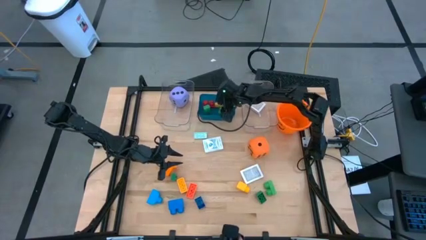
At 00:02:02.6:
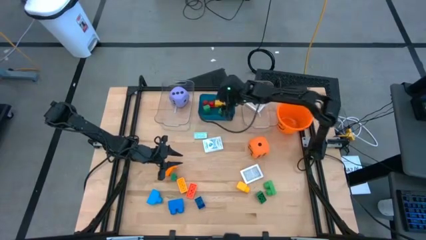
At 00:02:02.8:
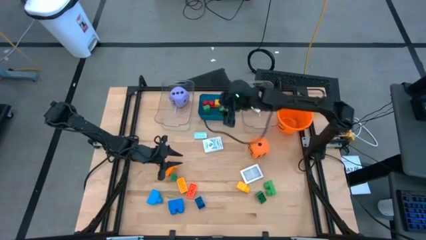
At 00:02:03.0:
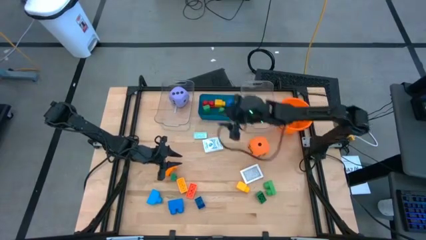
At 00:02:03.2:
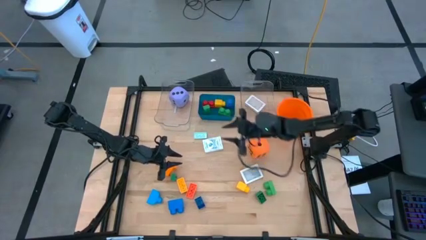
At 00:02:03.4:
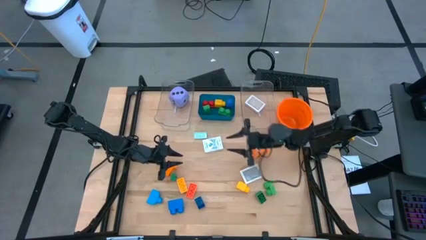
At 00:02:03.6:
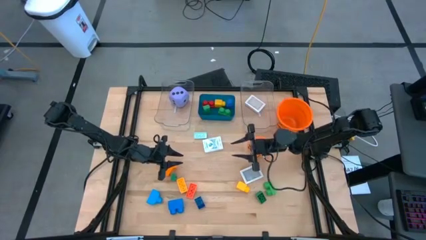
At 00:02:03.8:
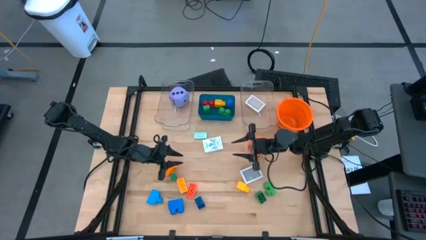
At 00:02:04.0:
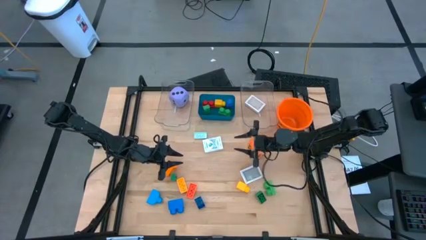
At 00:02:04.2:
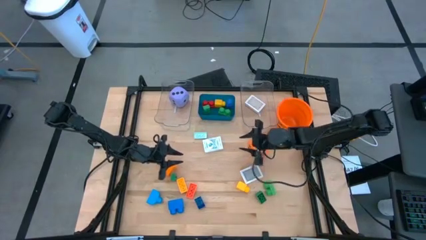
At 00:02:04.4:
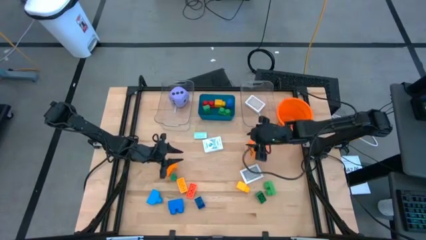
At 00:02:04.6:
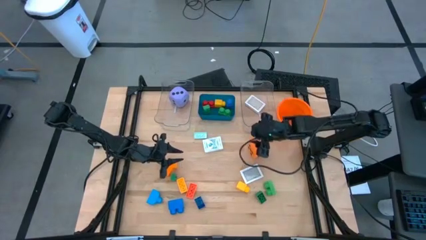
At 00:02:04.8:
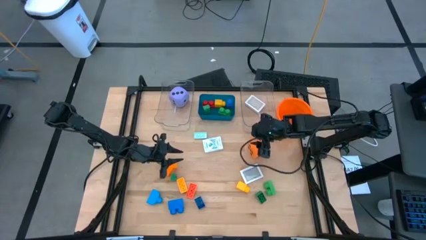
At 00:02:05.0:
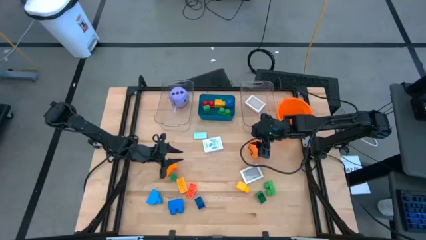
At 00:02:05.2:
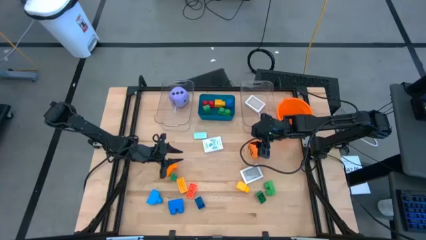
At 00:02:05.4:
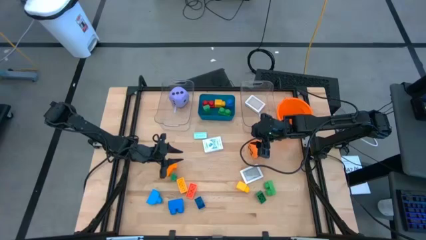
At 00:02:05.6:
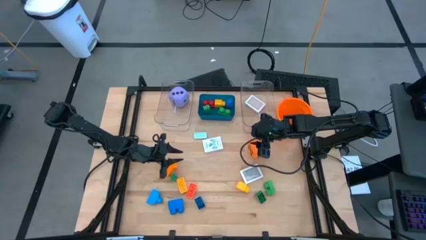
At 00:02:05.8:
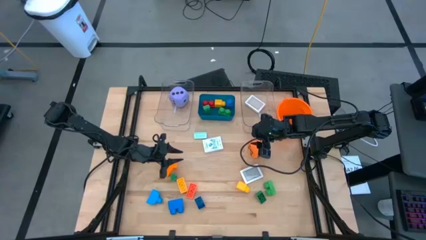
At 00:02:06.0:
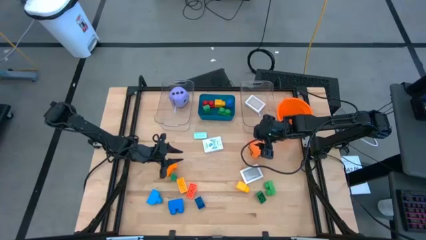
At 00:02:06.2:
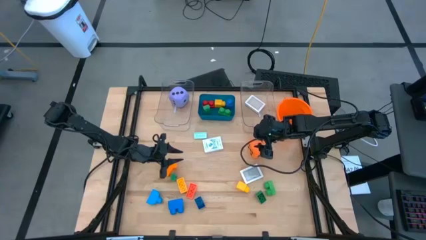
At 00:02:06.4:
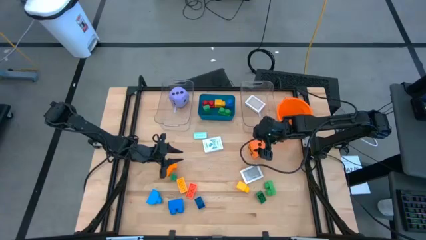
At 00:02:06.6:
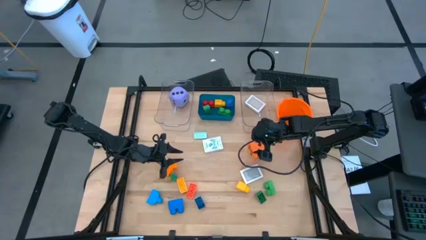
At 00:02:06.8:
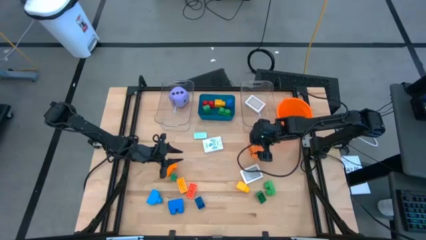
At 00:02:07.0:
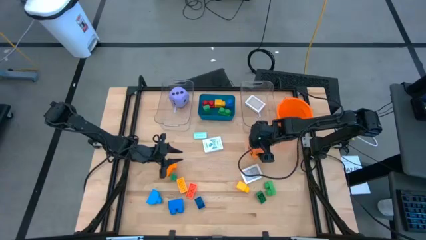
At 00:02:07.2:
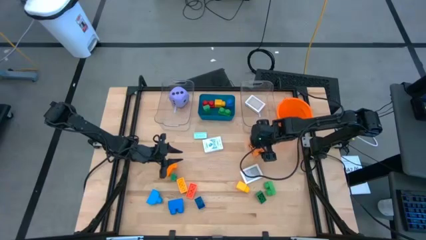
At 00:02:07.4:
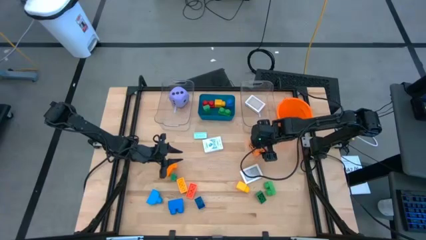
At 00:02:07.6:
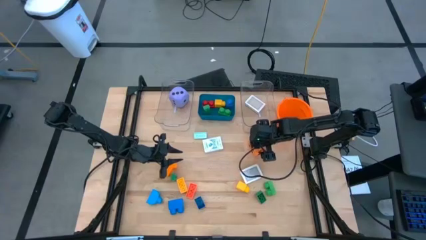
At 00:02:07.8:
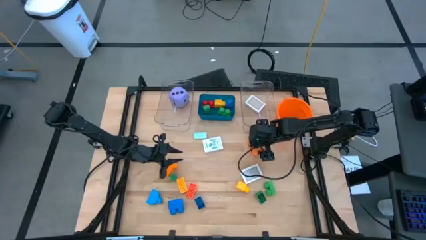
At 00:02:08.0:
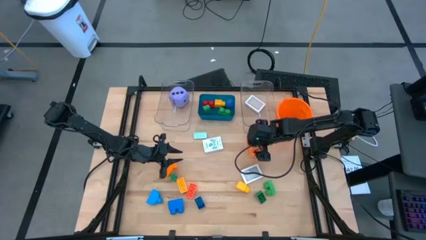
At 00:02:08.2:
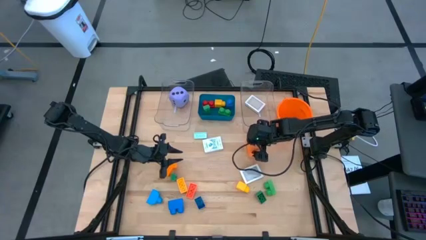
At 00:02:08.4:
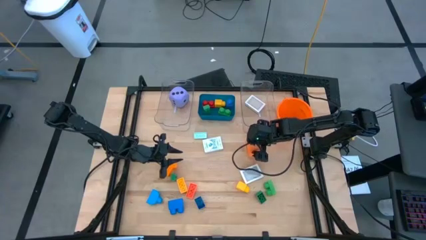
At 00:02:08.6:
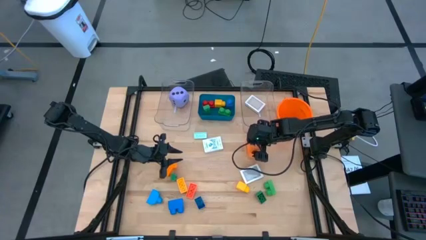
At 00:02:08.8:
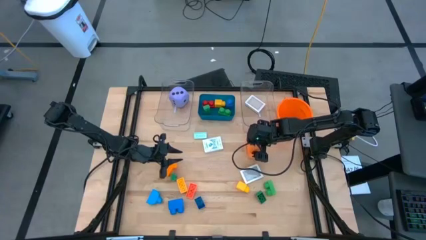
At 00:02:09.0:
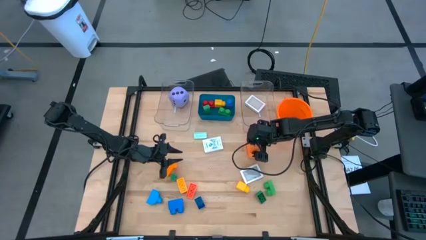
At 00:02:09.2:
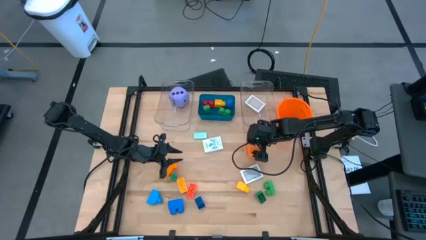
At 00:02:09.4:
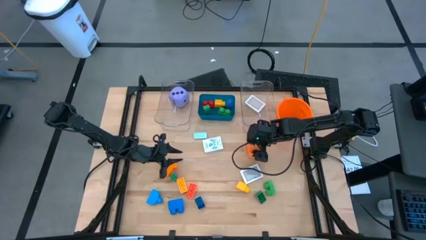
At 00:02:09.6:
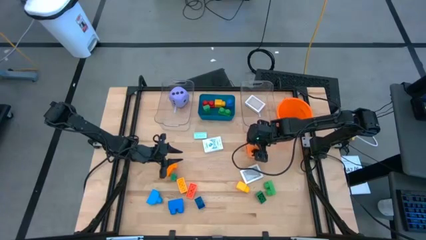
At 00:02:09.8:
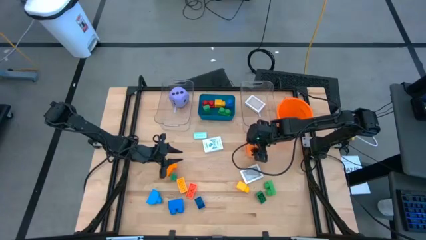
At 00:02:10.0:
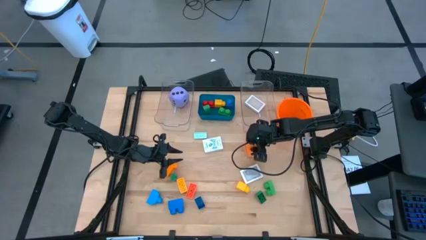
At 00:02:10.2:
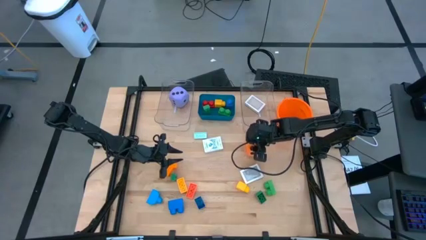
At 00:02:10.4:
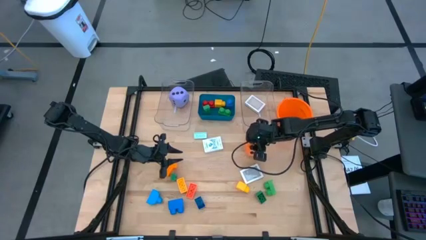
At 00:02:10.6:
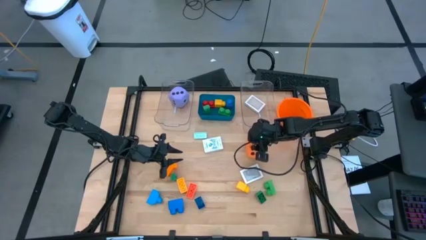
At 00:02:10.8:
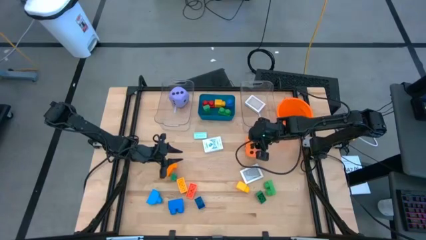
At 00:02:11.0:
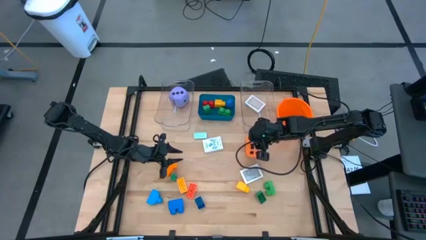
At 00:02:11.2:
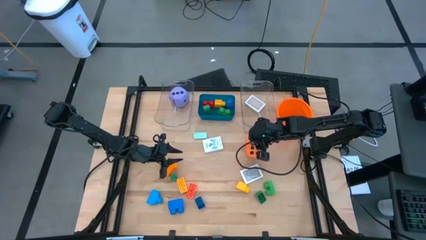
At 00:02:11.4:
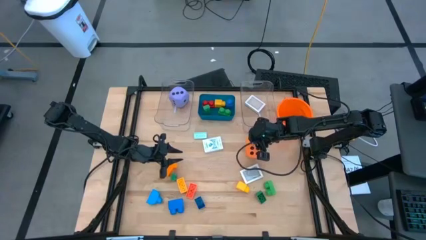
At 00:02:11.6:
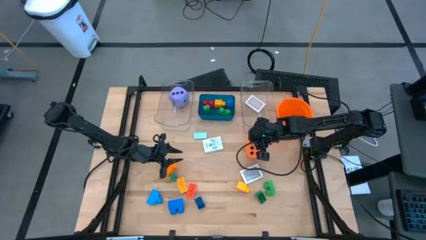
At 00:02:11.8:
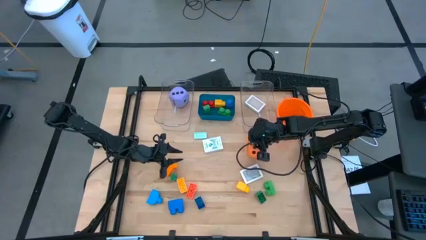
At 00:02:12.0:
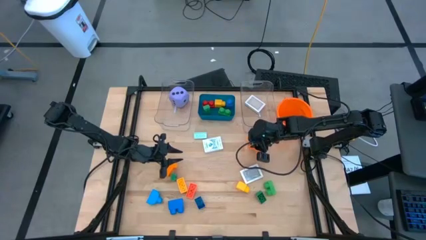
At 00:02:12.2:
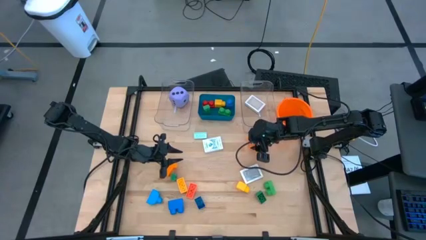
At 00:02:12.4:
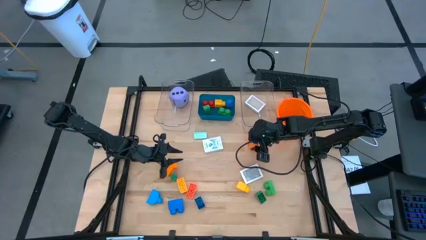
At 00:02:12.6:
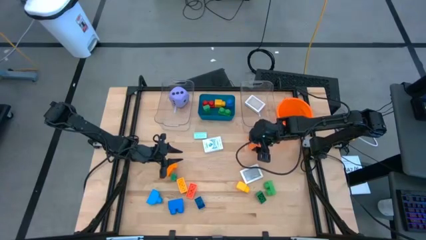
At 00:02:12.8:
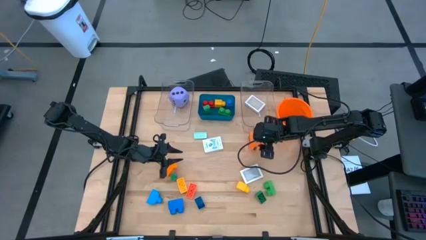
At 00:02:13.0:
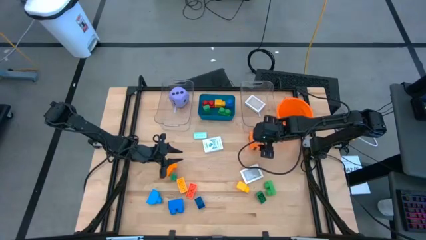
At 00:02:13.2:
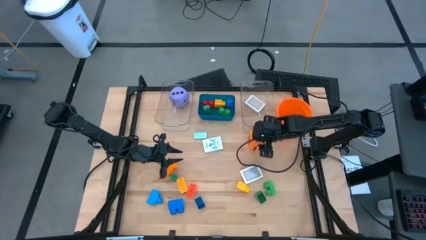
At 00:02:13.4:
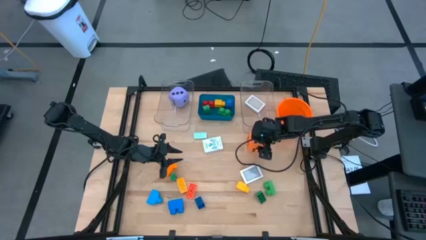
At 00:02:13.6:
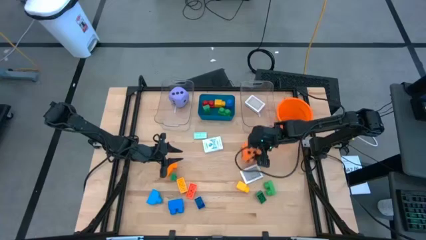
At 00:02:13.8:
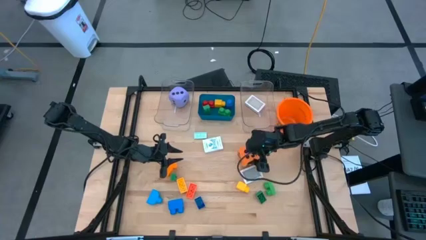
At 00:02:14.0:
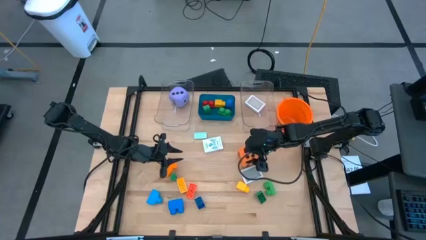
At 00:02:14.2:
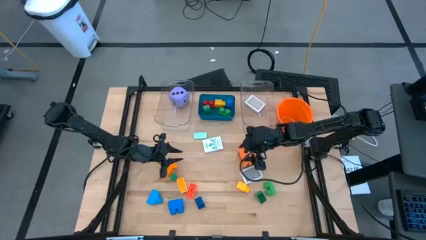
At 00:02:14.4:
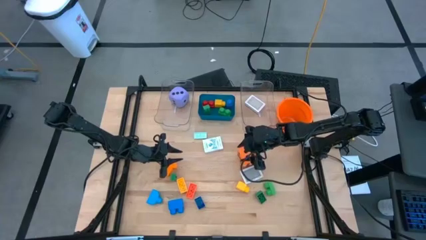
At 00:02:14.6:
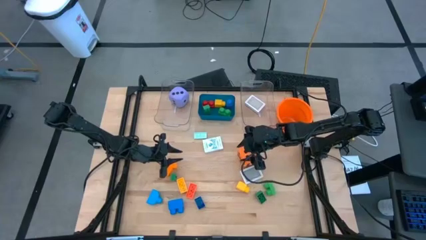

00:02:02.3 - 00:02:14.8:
Task: Pick & Place Toys
Put the orange dice into the left transparent bin

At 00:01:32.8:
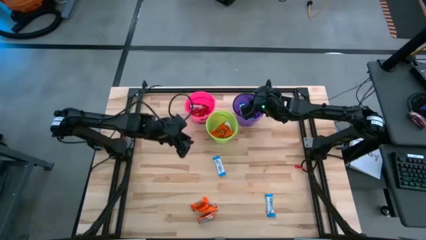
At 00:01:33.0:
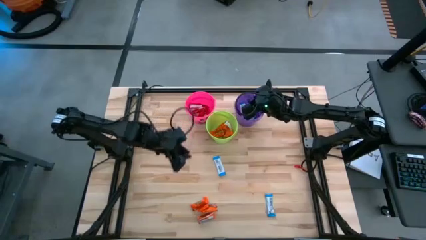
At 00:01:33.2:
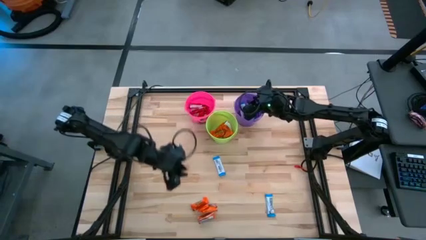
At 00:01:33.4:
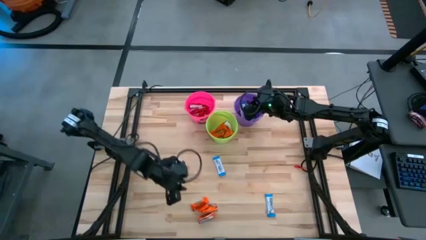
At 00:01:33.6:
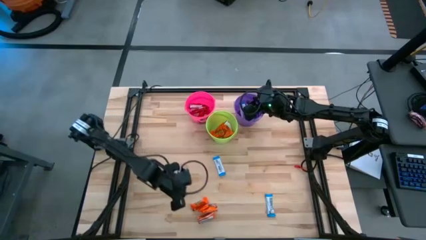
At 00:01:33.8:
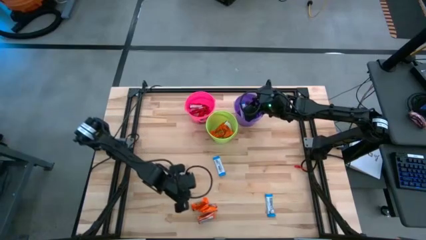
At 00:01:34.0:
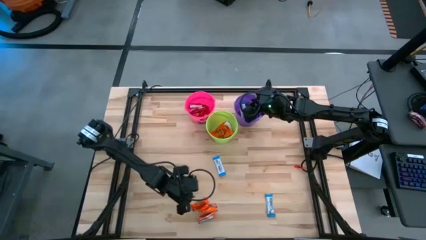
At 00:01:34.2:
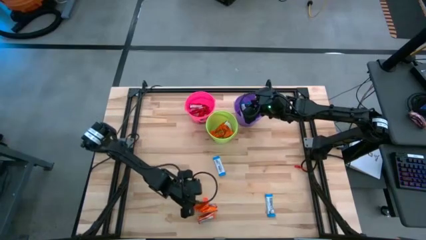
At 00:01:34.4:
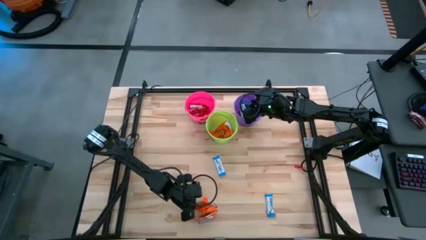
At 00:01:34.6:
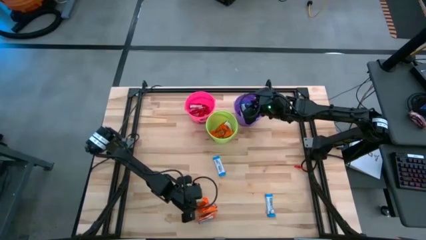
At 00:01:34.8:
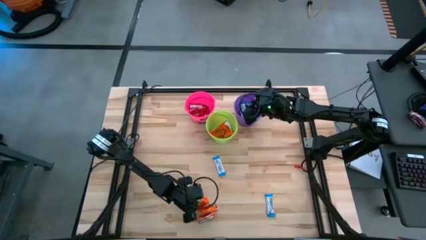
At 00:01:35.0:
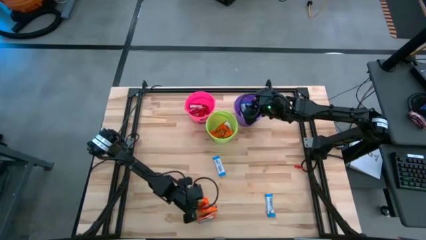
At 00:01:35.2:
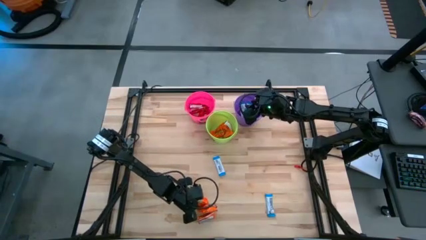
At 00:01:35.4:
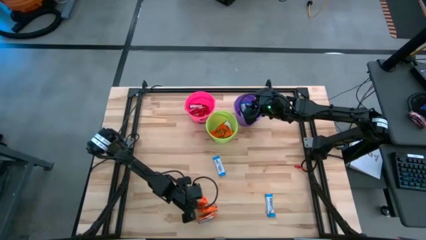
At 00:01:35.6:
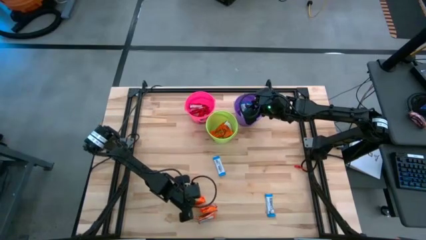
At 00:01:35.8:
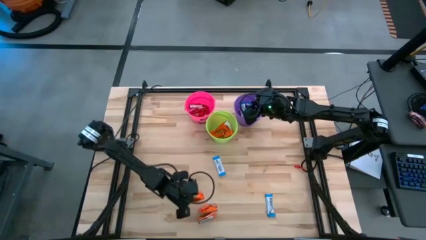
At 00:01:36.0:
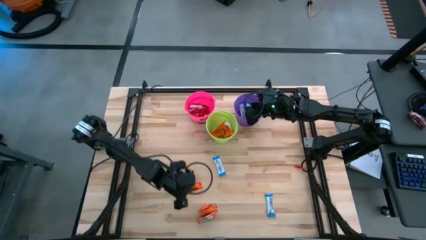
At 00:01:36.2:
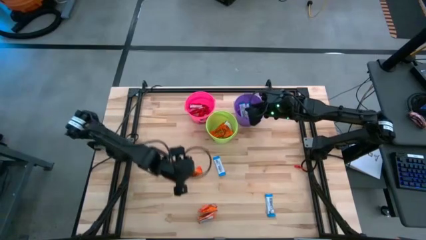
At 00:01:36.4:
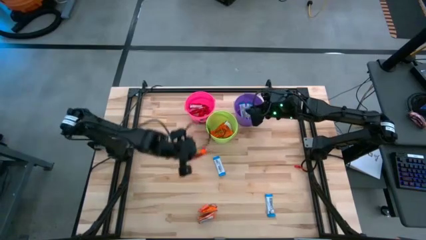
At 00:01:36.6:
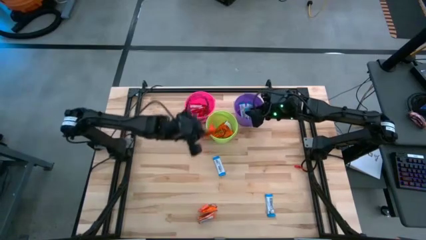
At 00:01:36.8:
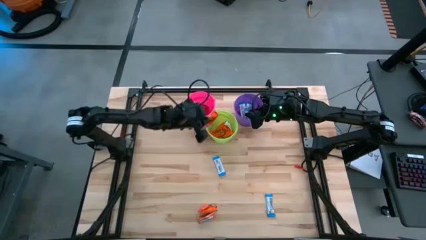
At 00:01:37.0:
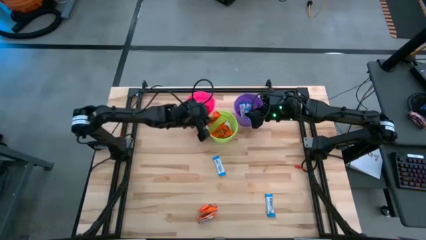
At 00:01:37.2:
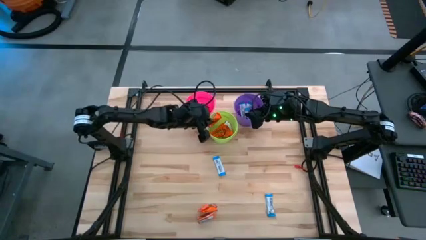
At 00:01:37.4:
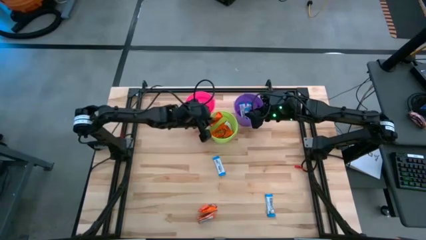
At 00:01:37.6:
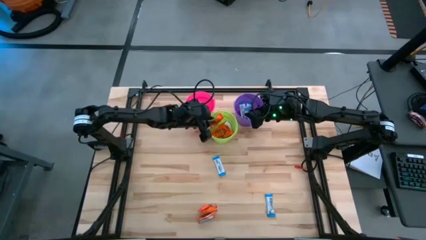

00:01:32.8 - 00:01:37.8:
Task: Sort candy
Put the orange candy into the green bin
